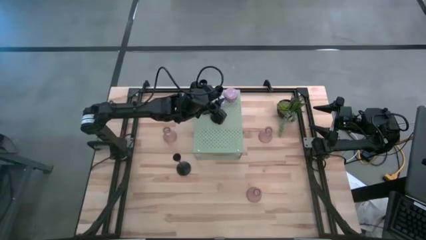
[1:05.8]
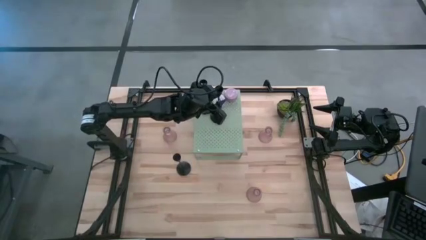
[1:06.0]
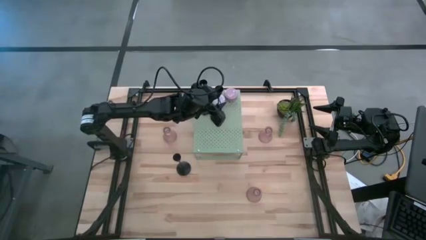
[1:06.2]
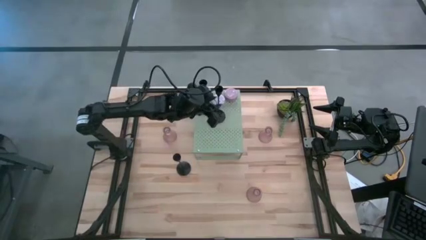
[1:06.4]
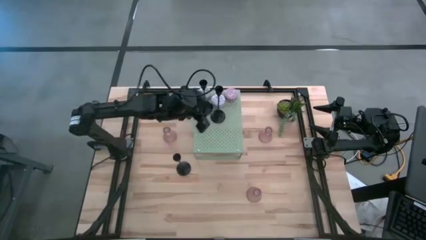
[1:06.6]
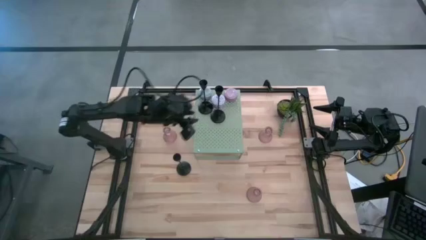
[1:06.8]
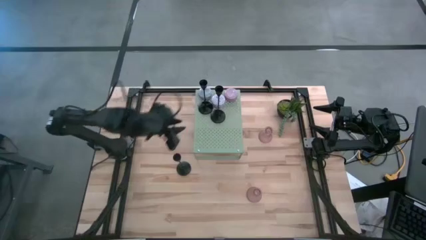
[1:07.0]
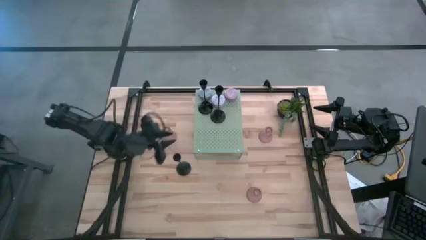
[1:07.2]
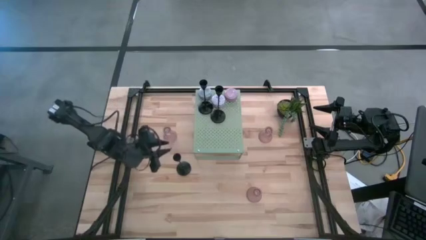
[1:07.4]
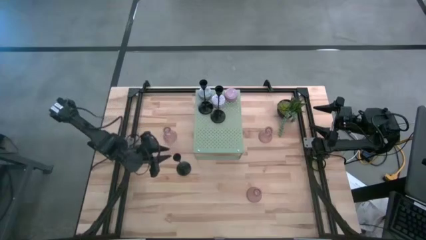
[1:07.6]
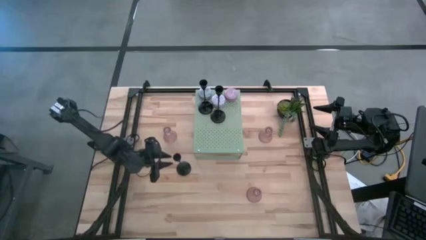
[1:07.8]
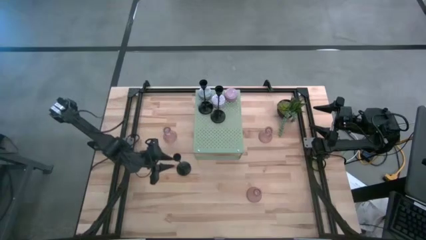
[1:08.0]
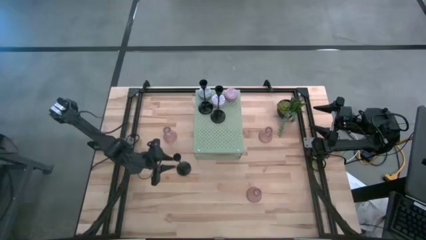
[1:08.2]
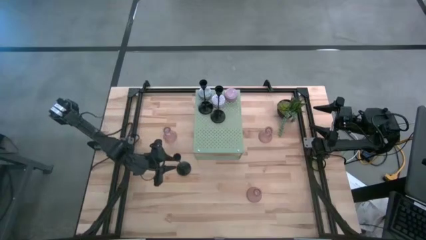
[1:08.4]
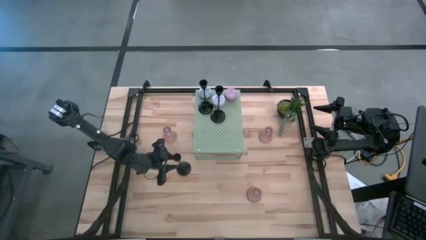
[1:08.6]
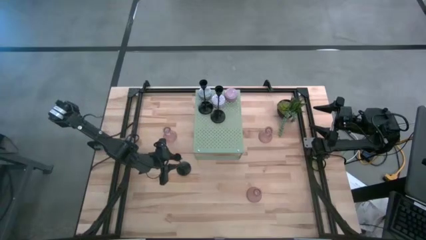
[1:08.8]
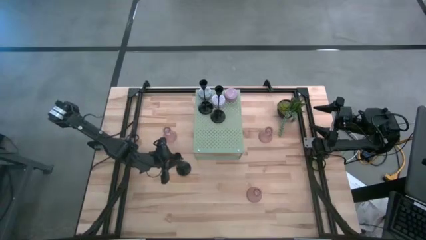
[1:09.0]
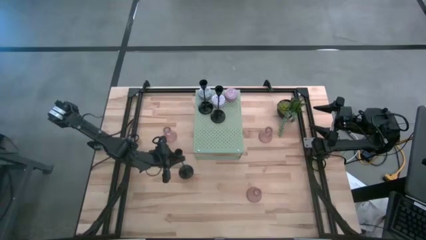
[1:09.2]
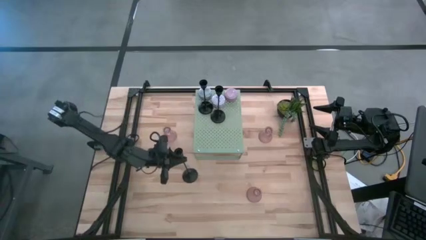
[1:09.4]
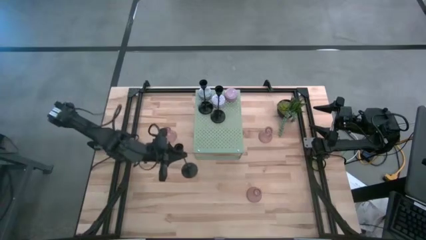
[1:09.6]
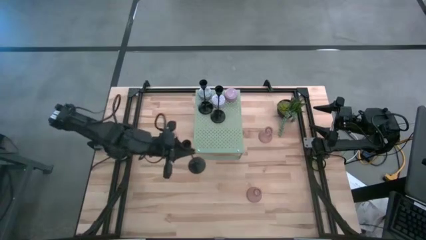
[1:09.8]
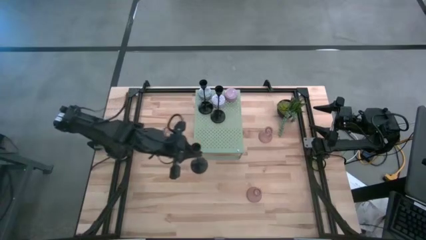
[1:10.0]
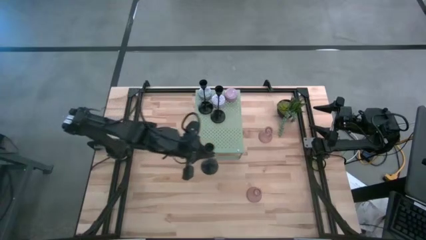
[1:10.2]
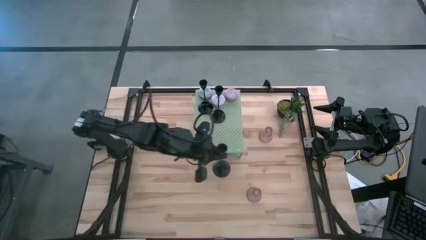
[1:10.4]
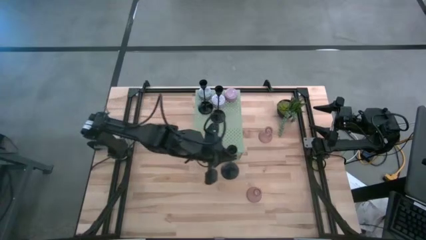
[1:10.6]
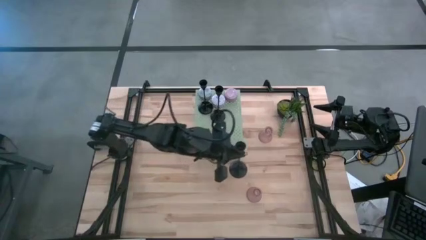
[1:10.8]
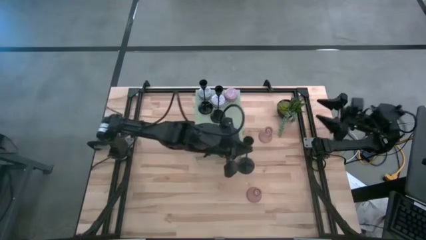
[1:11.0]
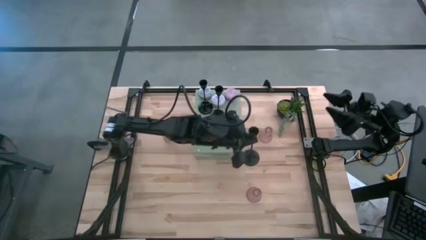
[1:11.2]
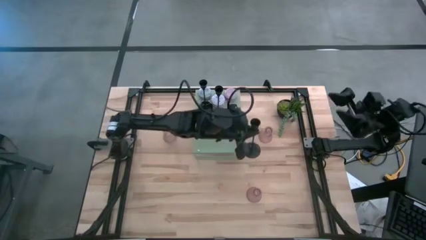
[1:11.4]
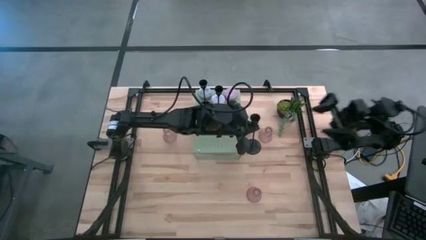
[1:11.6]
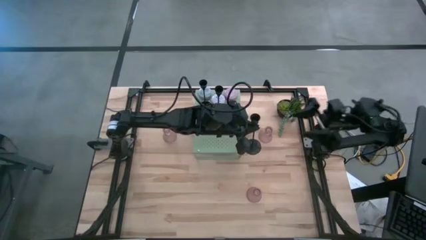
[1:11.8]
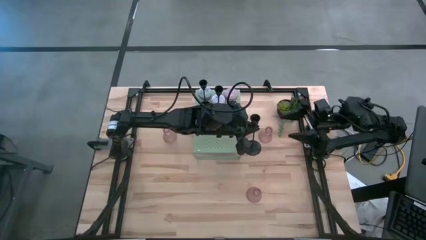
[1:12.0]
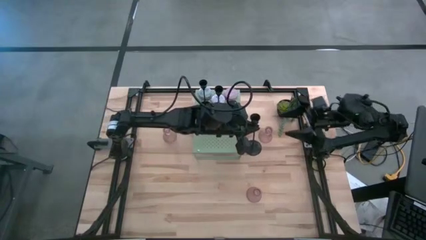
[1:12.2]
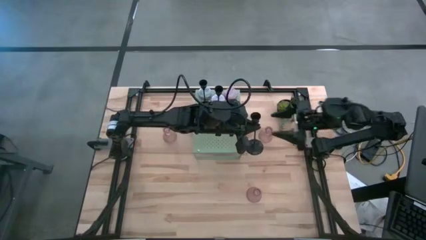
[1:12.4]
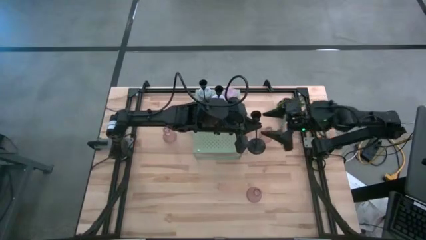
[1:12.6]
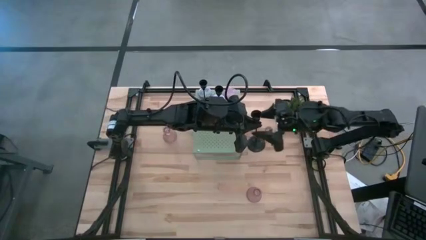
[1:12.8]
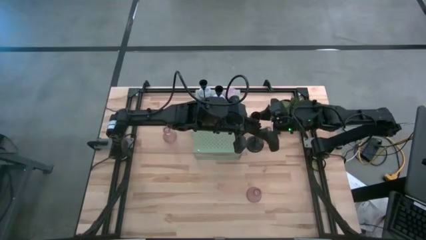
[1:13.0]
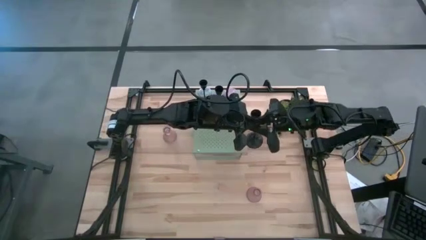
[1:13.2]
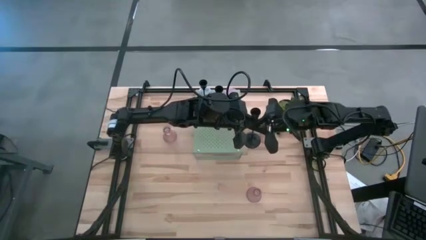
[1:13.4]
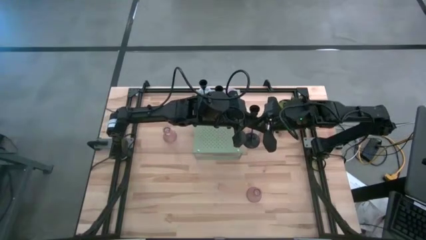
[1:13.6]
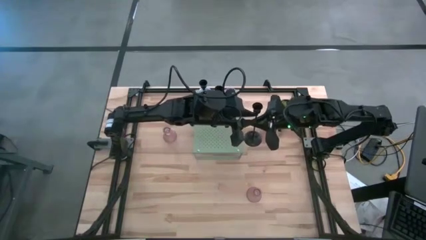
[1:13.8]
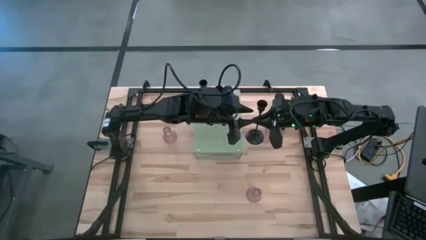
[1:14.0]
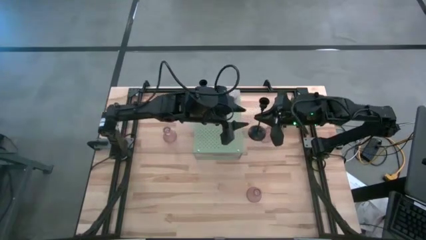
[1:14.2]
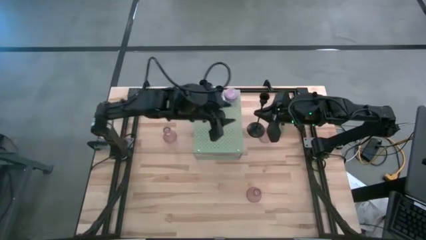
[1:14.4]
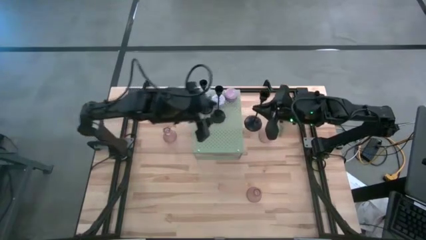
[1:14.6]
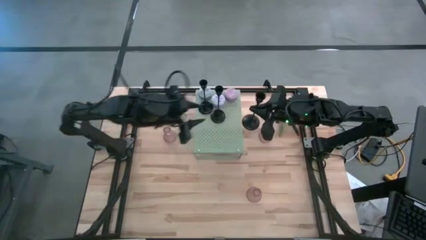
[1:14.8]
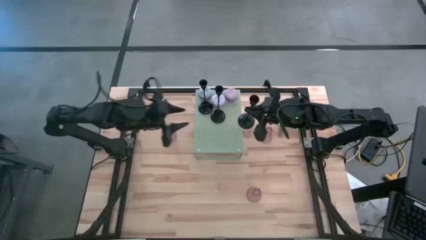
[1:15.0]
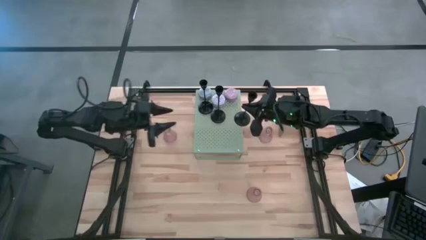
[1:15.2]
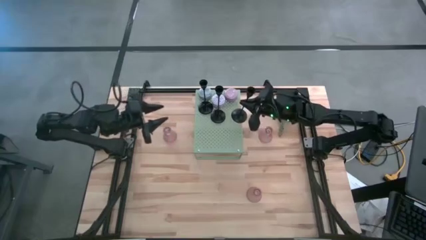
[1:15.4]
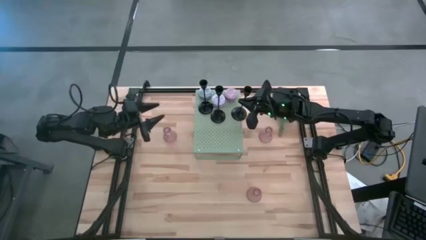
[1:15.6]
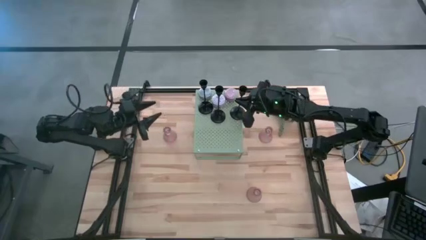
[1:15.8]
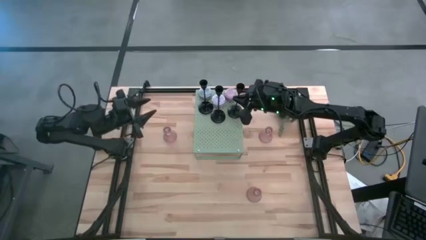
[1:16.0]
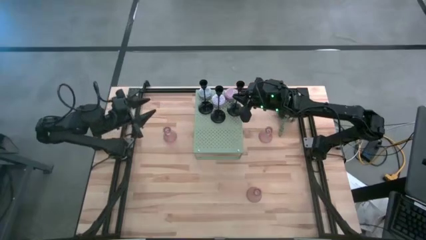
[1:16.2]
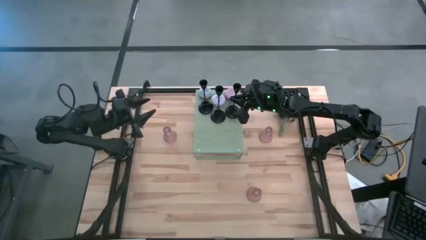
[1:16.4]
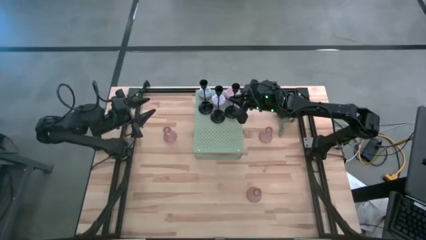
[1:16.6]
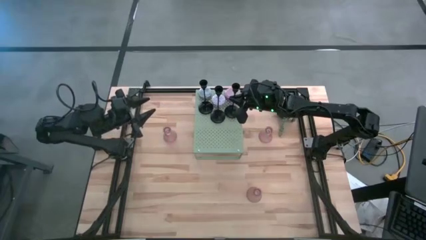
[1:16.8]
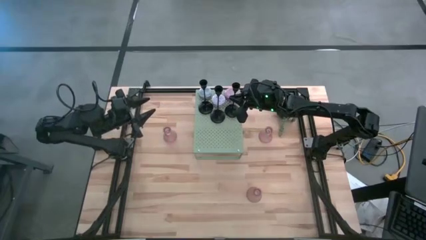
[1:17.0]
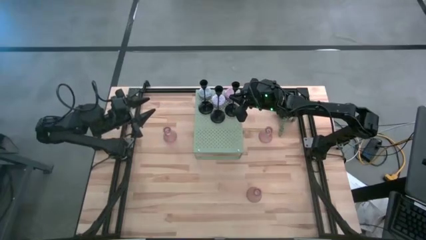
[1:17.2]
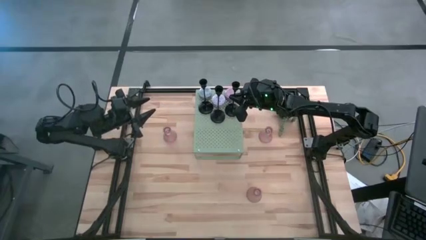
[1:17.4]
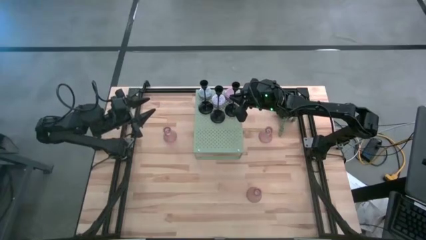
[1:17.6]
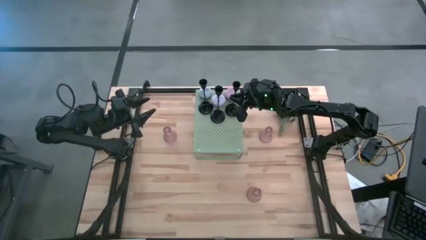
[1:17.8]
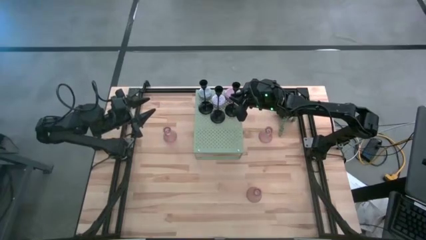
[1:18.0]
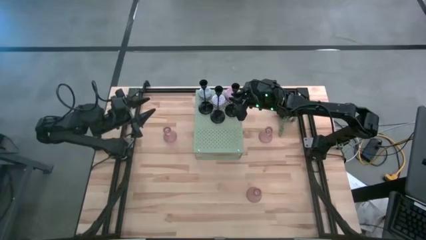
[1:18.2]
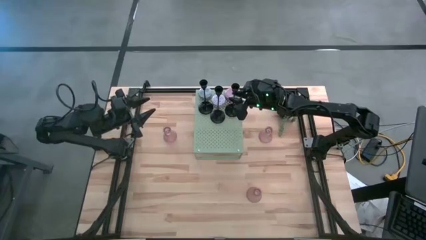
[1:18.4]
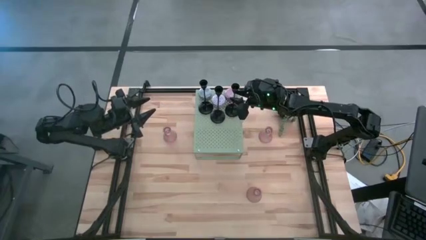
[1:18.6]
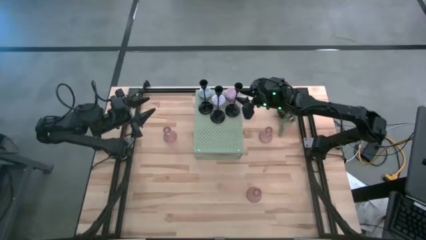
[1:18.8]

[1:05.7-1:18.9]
Task: Pick & Place candle stick holders
Put the black candle holder on the shelf

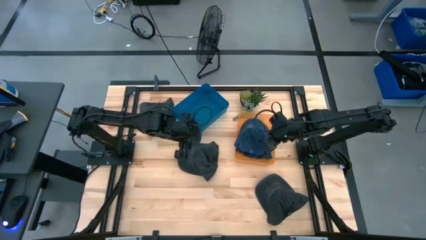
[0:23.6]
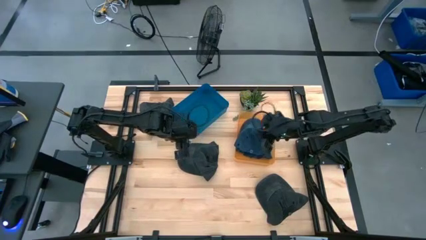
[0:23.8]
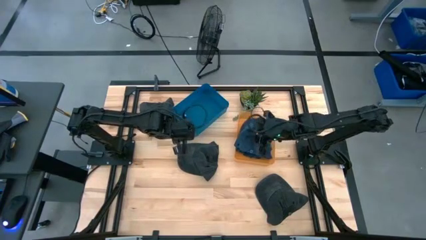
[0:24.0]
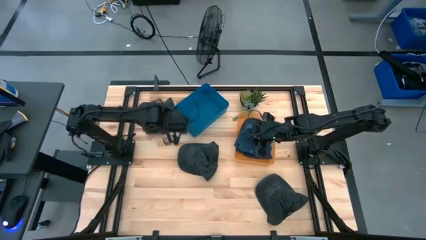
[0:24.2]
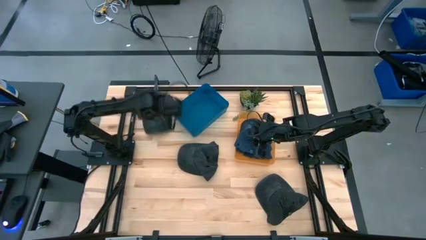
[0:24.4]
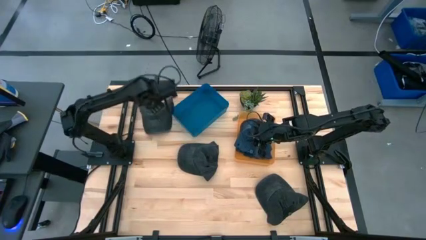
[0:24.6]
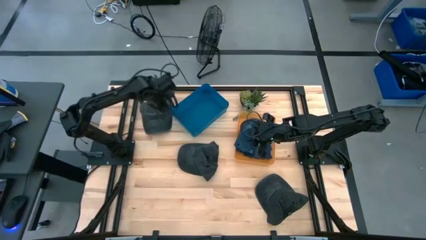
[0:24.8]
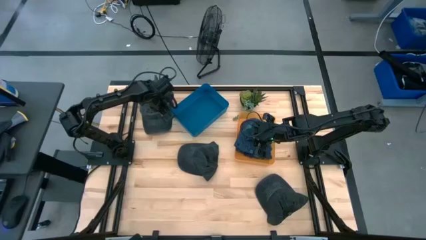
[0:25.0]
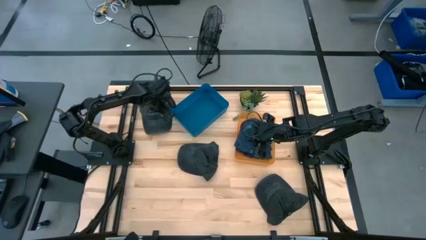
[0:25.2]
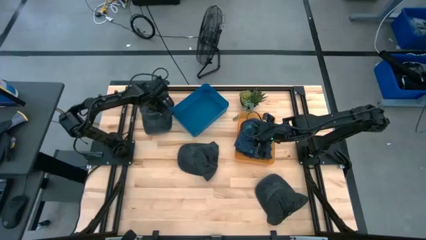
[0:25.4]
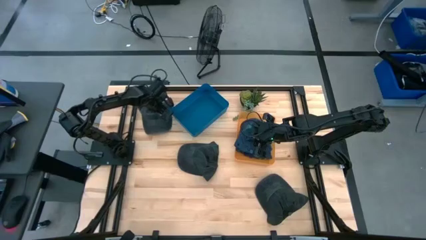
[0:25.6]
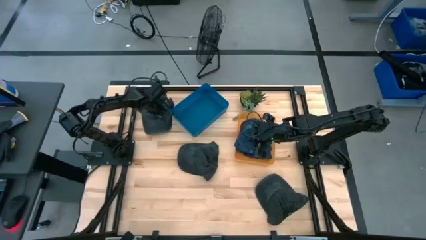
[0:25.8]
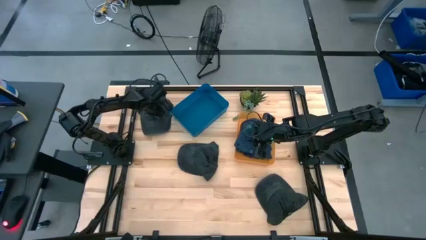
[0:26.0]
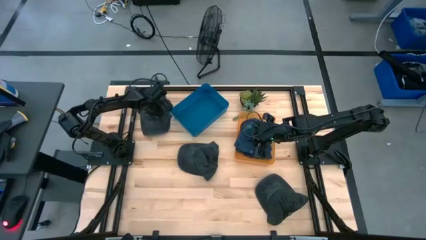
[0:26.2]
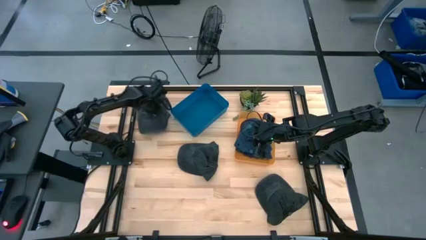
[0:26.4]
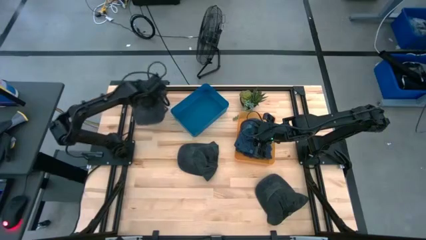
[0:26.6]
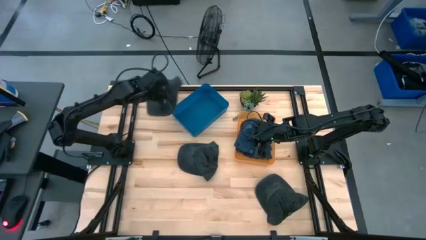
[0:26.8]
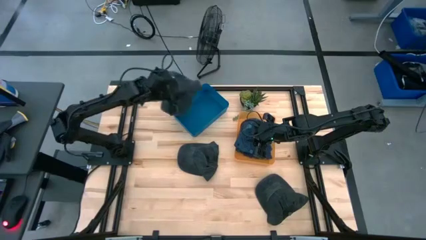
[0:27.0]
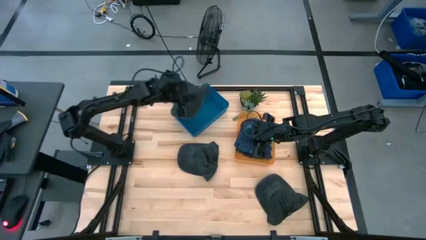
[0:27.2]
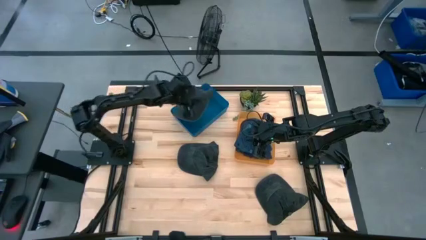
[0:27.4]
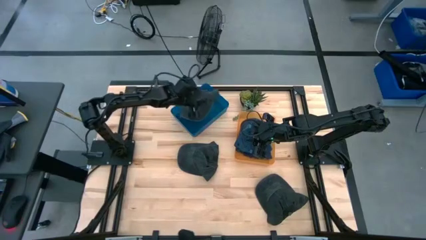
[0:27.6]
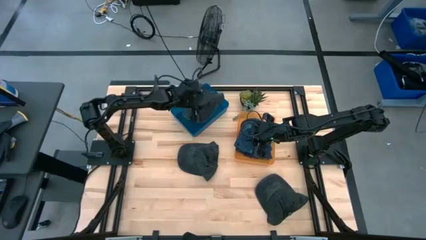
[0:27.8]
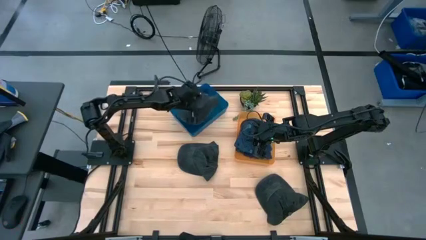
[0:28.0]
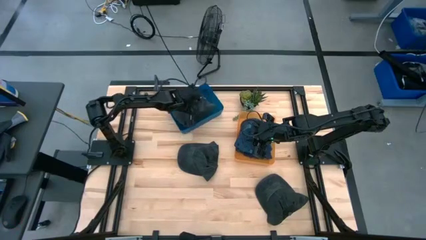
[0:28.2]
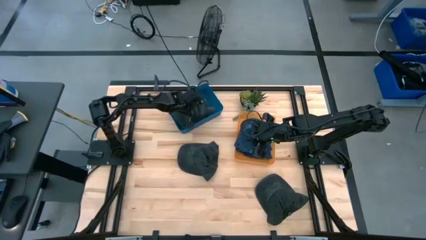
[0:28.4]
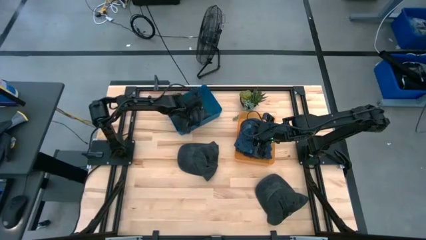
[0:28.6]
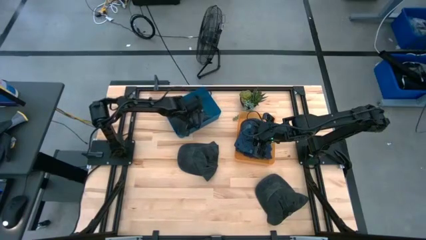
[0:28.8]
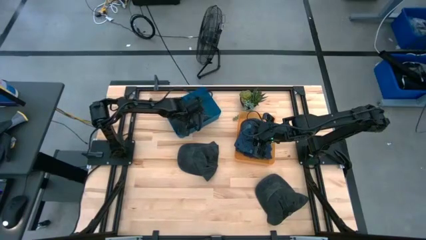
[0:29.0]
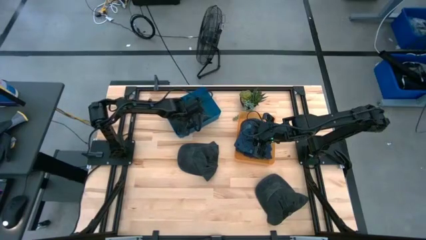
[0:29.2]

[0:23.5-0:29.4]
Task: Pick & Place hat
Put the top left black cap into the blue bin
